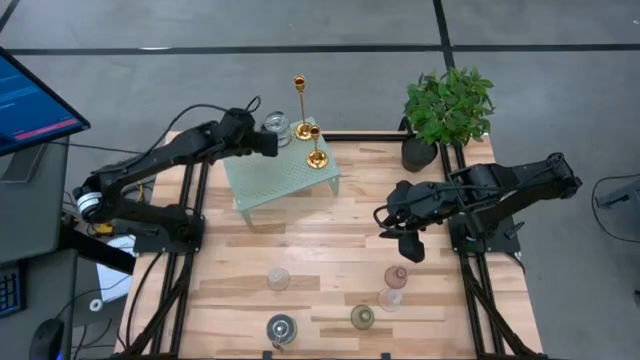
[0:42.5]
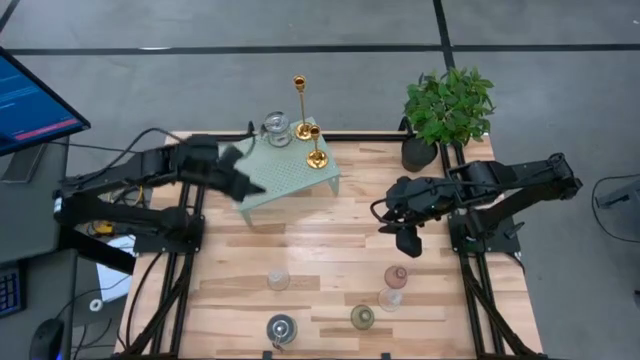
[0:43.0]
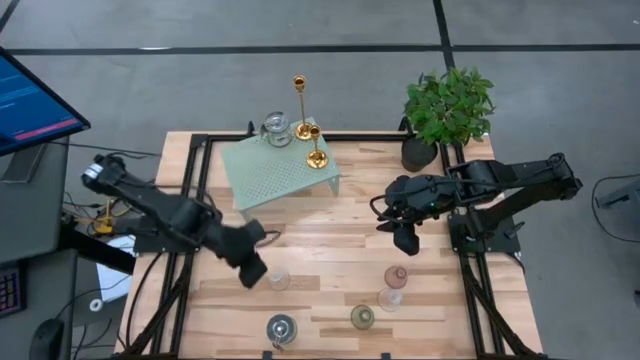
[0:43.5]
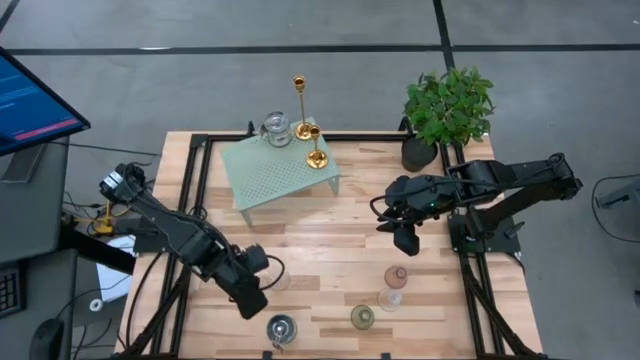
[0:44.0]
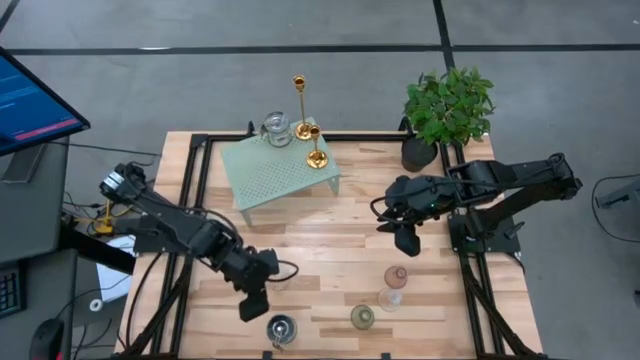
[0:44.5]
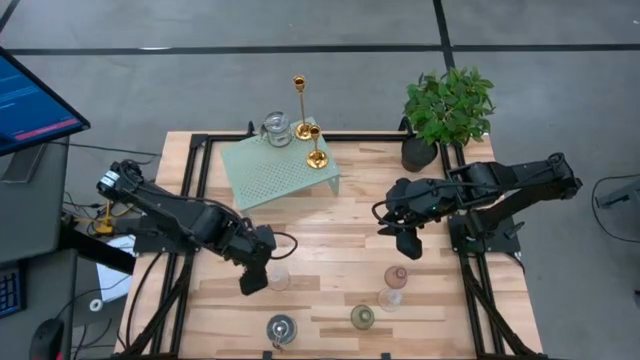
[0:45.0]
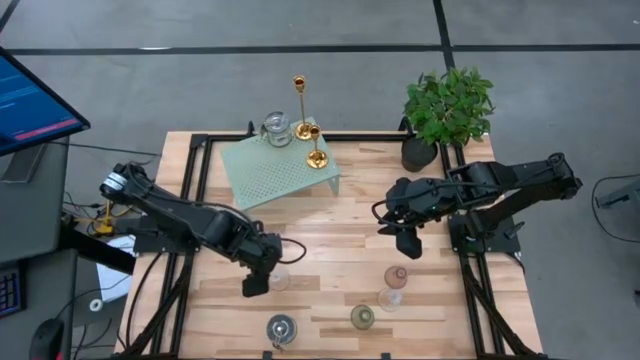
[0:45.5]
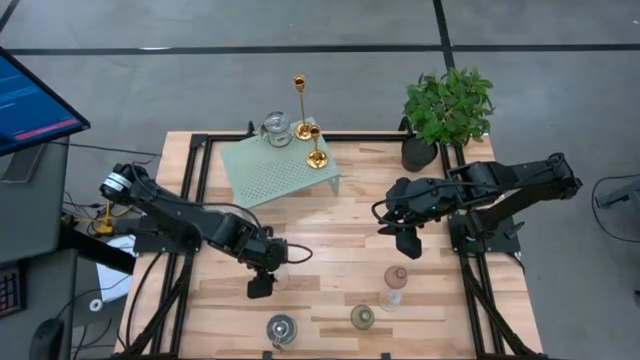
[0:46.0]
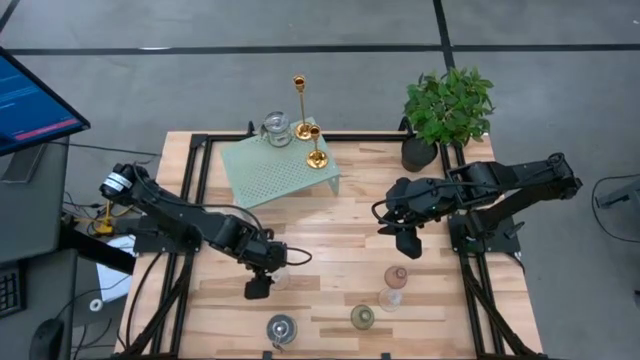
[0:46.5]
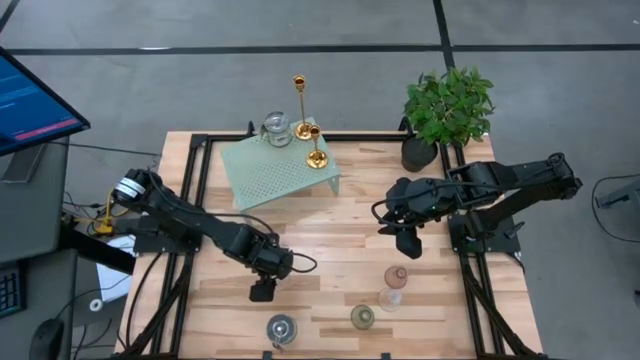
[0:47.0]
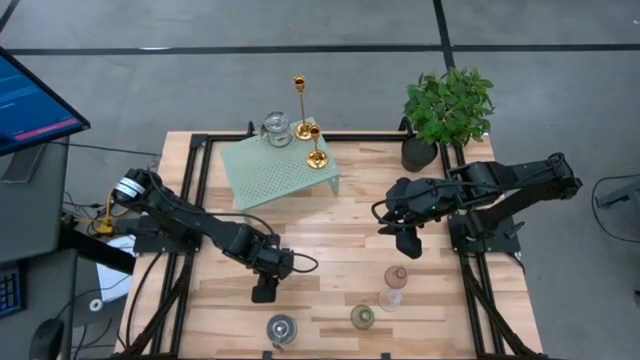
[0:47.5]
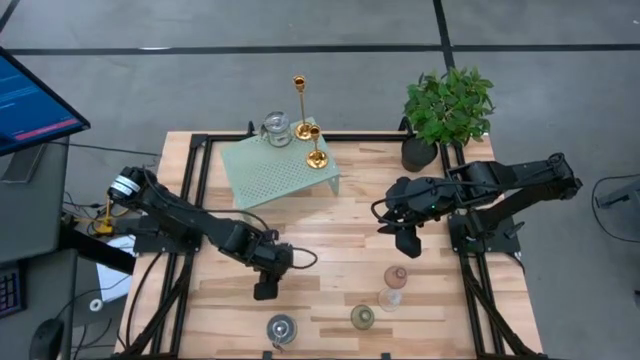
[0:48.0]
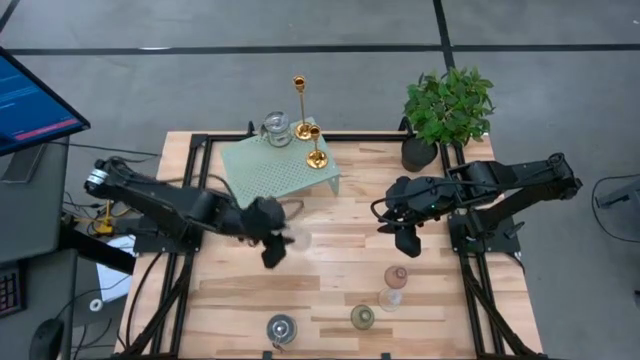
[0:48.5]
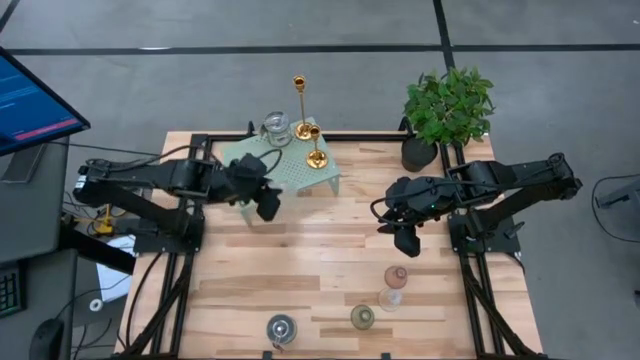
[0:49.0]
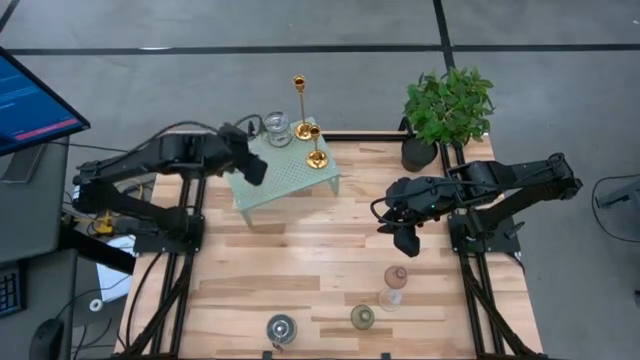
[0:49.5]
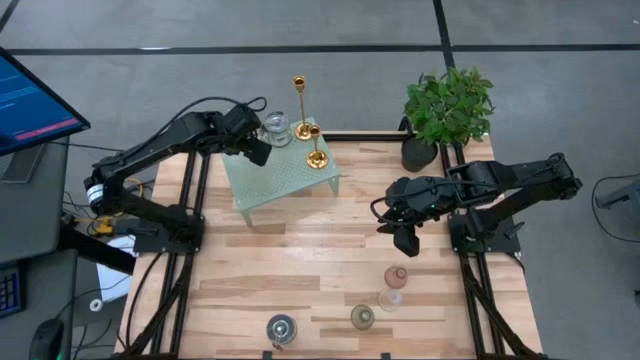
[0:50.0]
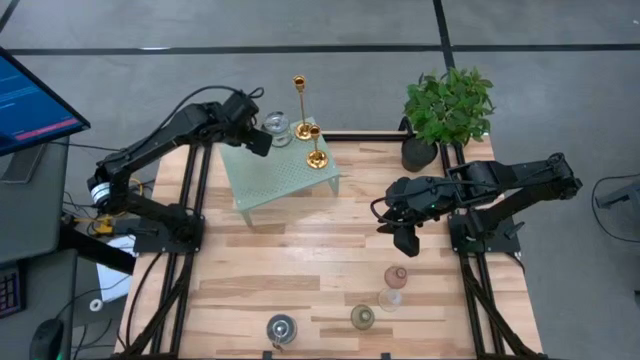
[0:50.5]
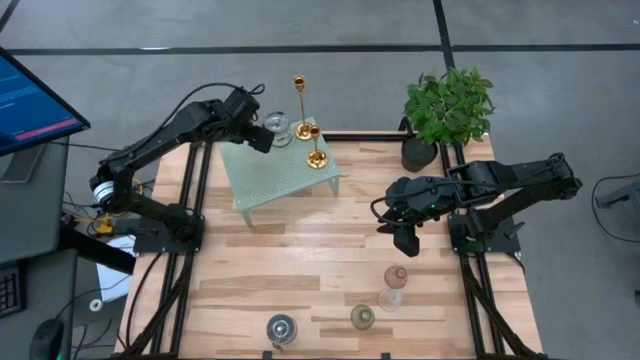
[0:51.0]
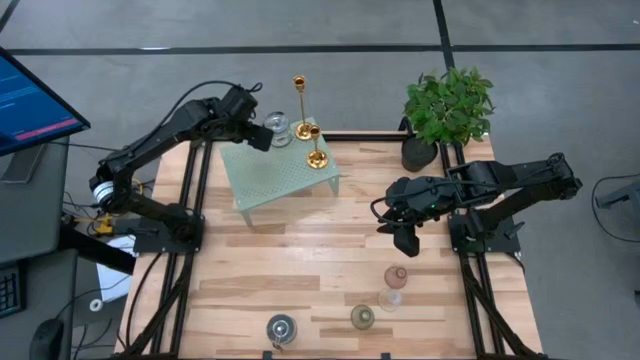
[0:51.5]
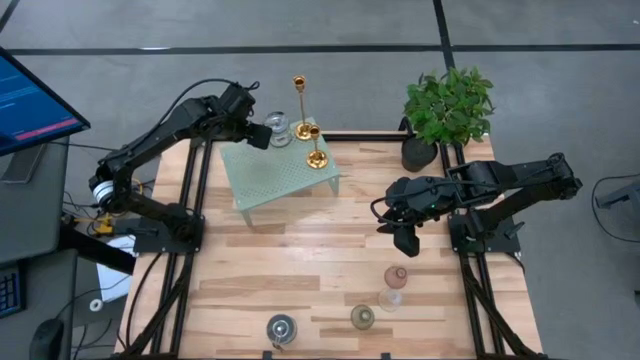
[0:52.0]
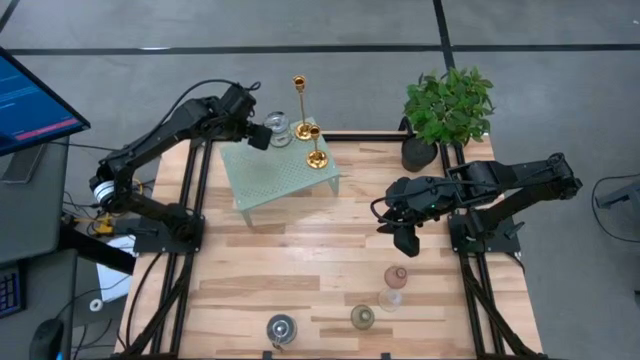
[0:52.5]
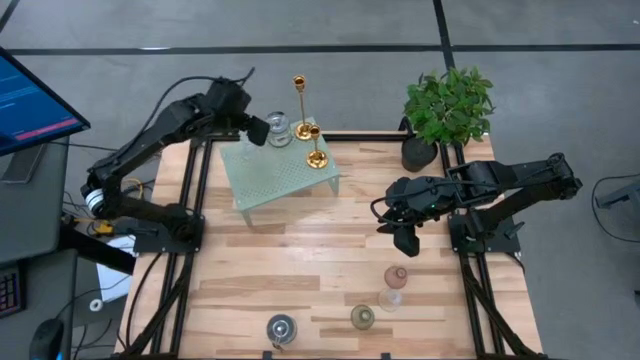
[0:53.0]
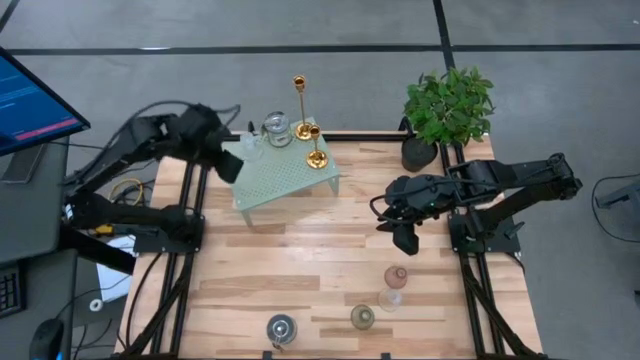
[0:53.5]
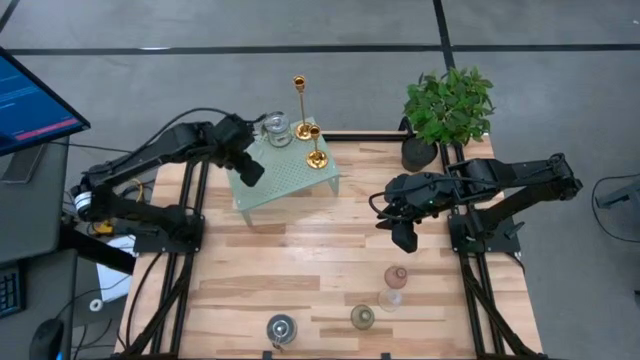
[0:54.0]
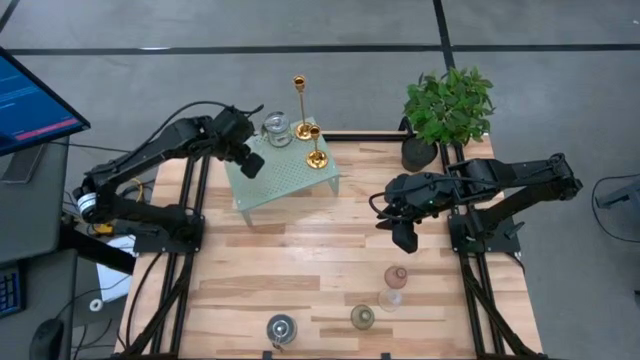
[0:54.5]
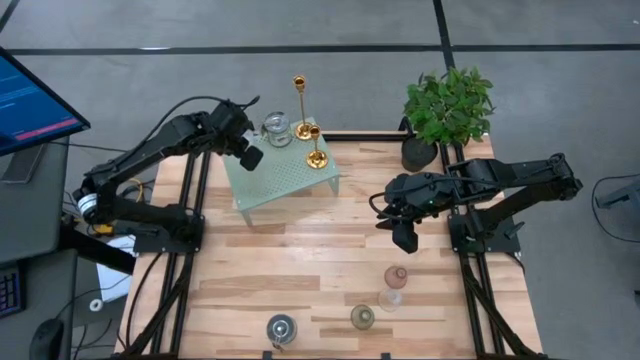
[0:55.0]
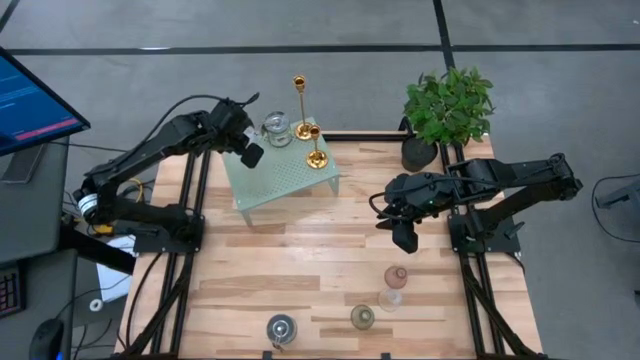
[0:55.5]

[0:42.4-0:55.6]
Task: Pick & Place candle stick holders
Put the left transparent candle holder on the shelf

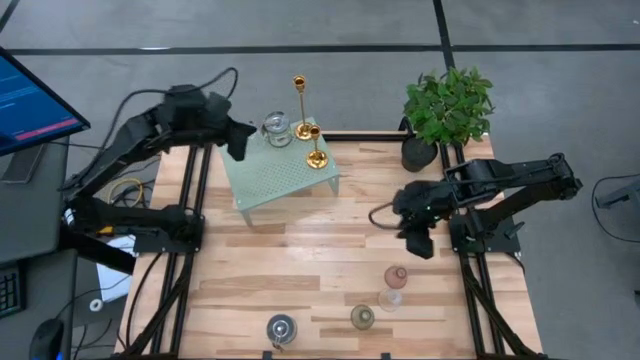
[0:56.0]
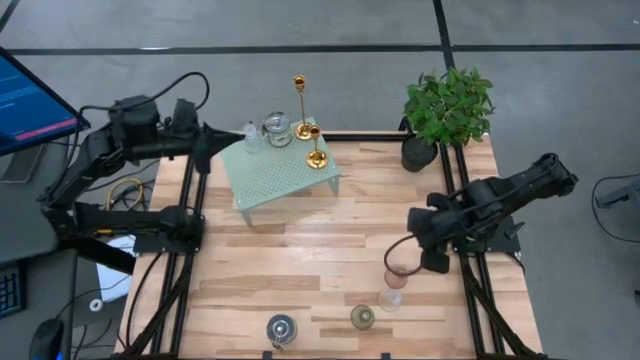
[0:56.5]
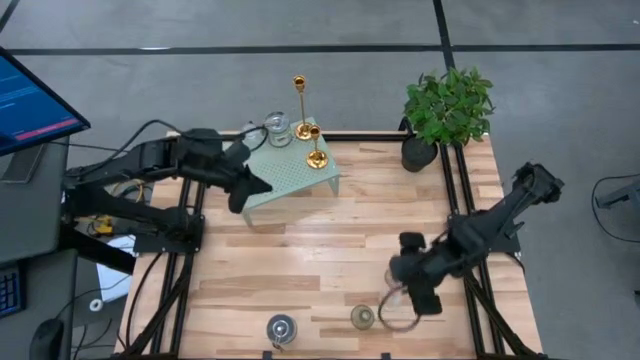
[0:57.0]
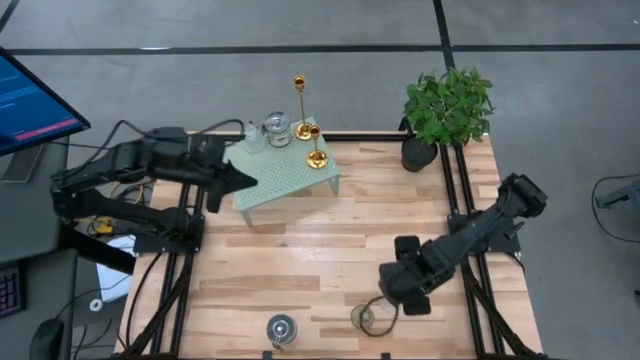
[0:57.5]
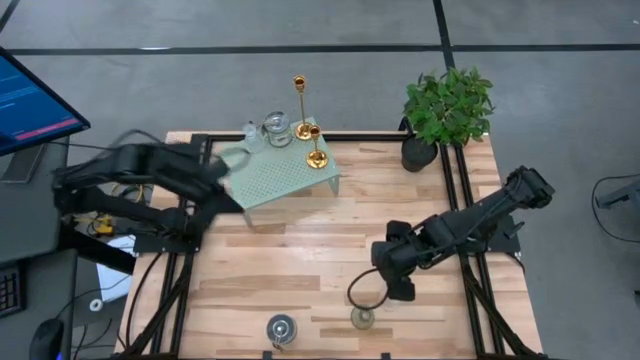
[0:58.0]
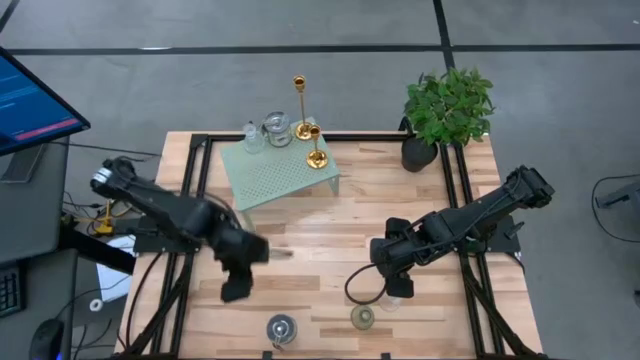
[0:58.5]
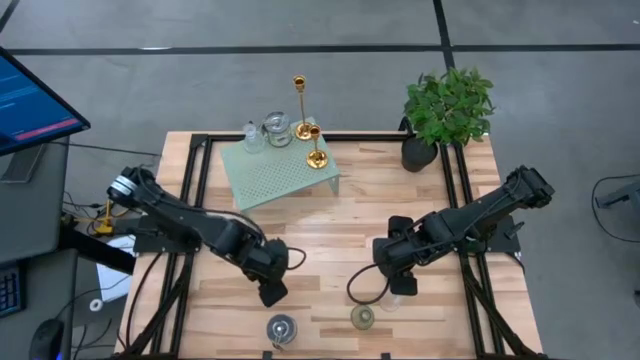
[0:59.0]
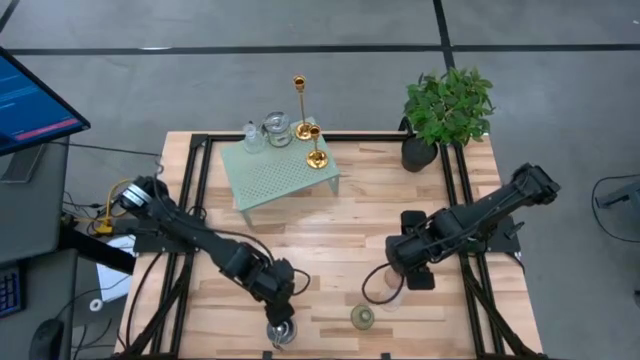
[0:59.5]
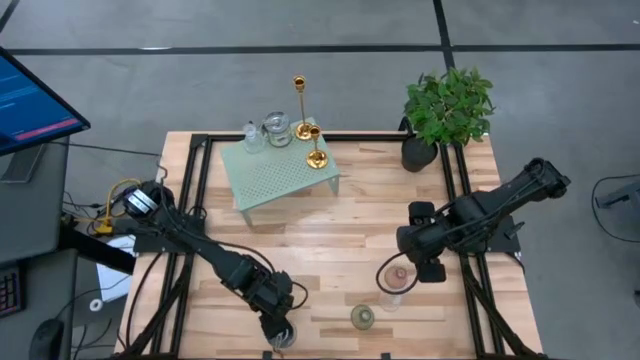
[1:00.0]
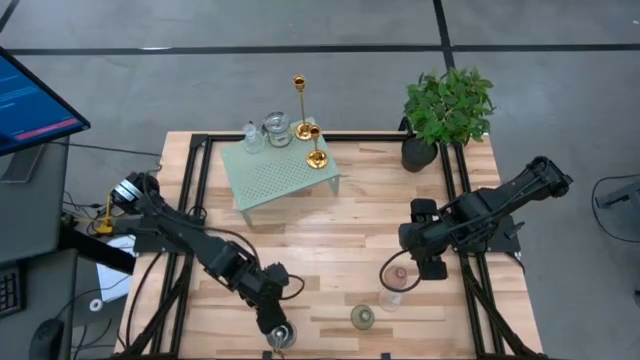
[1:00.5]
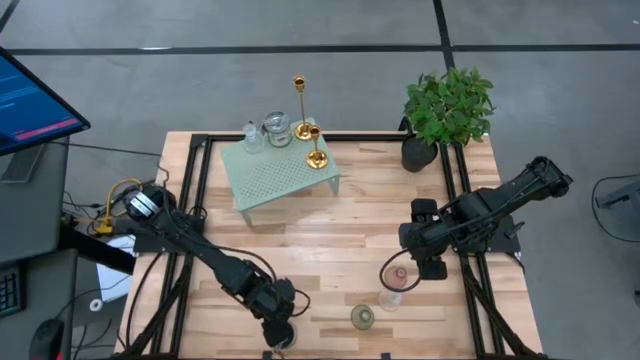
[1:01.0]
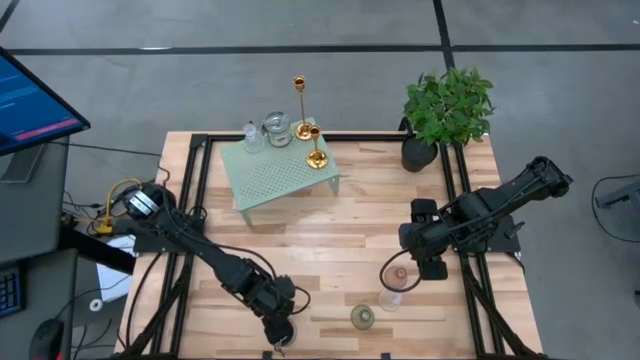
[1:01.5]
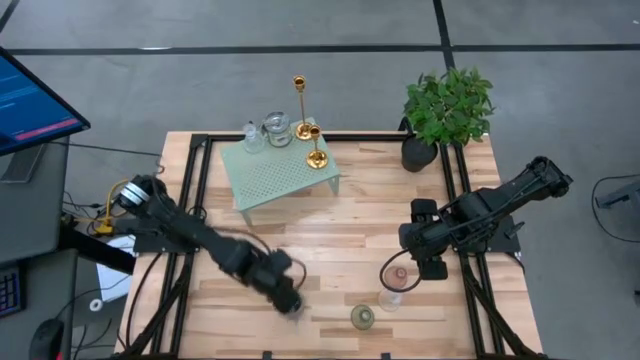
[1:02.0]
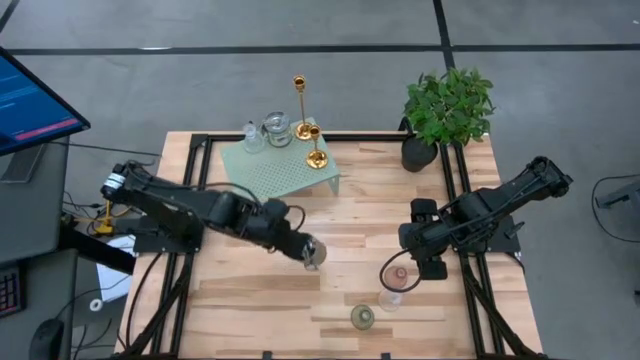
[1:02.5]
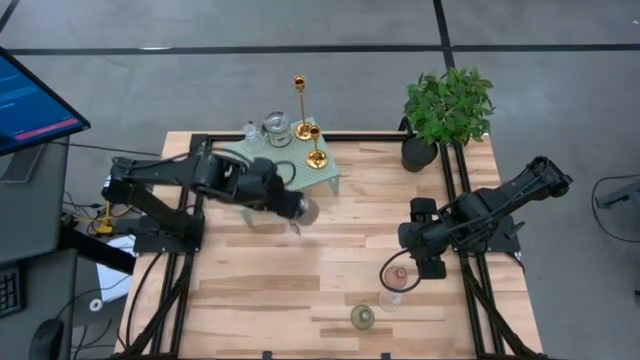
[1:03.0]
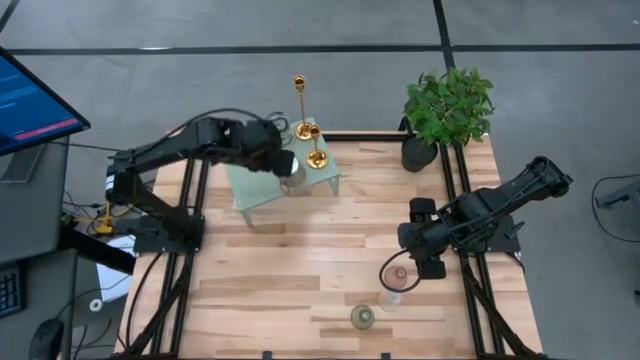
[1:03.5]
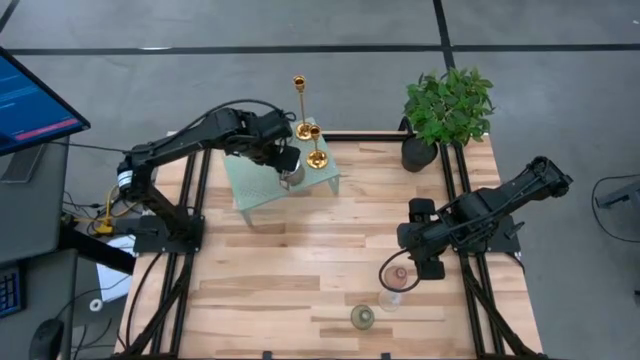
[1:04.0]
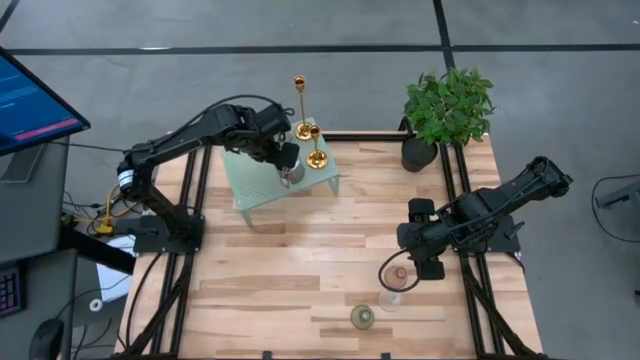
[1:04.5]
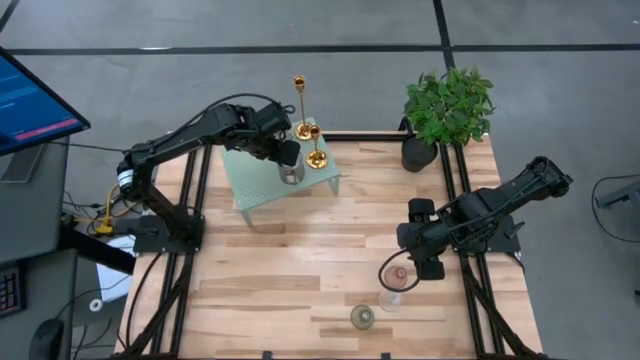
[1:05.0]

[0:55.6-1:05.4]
Put the orange scented candle on the shelf
